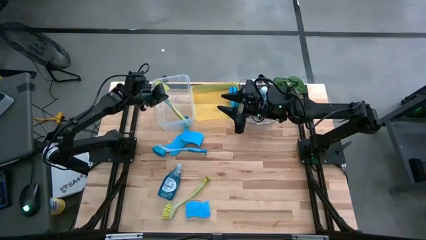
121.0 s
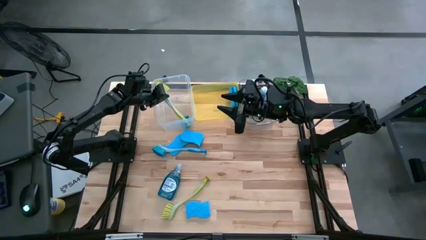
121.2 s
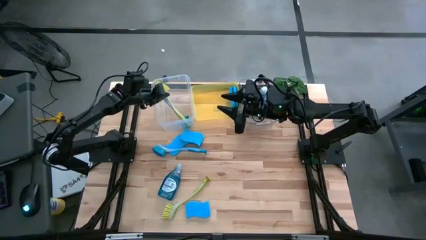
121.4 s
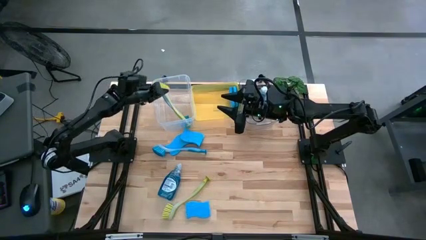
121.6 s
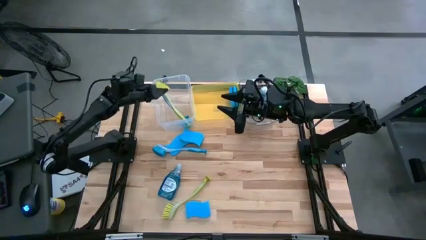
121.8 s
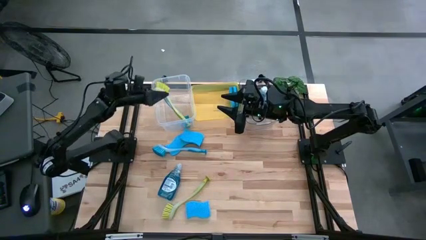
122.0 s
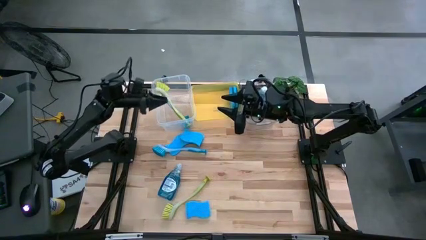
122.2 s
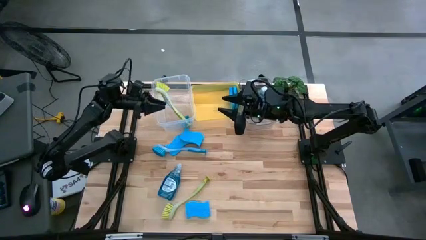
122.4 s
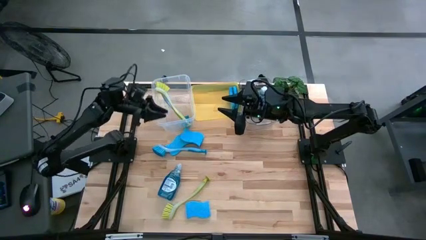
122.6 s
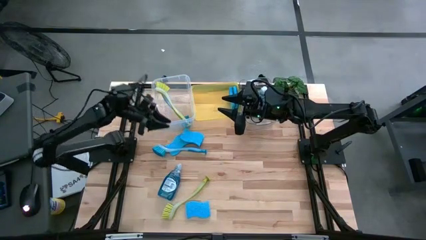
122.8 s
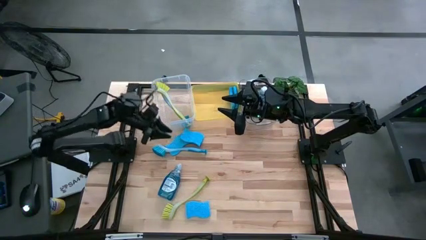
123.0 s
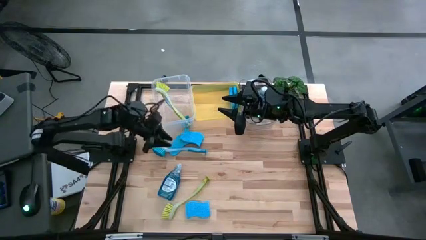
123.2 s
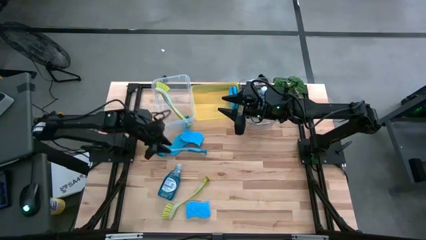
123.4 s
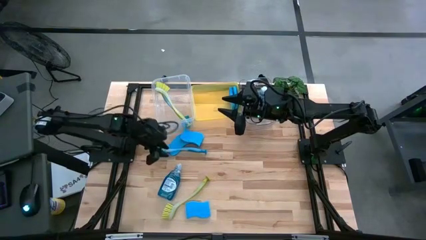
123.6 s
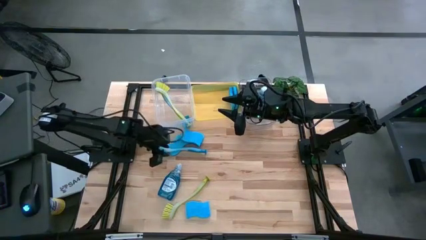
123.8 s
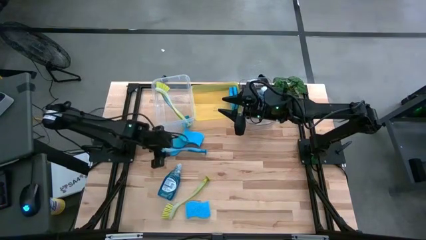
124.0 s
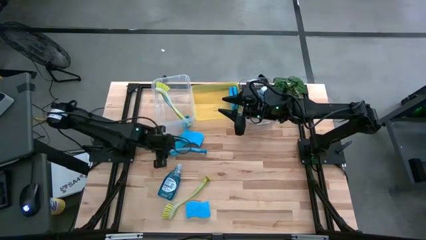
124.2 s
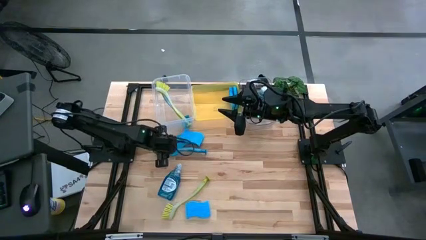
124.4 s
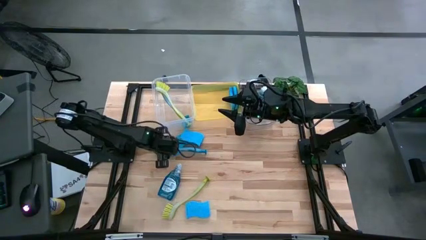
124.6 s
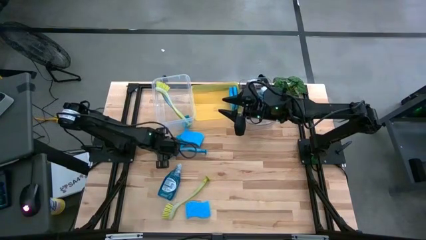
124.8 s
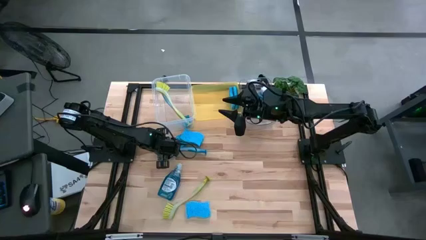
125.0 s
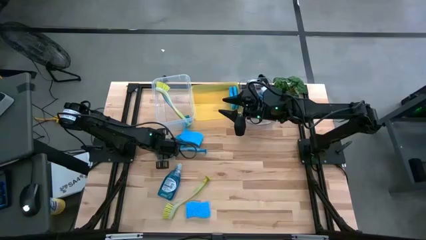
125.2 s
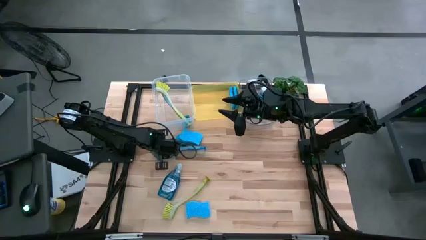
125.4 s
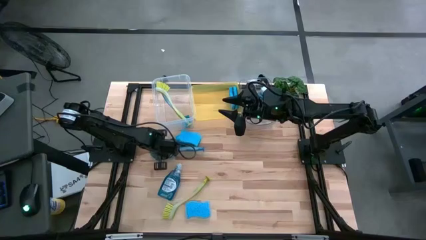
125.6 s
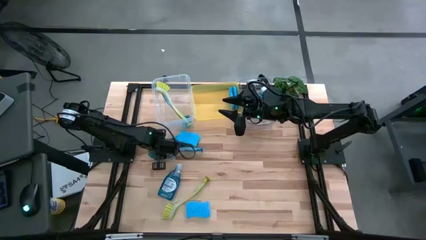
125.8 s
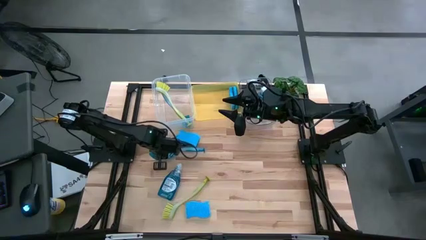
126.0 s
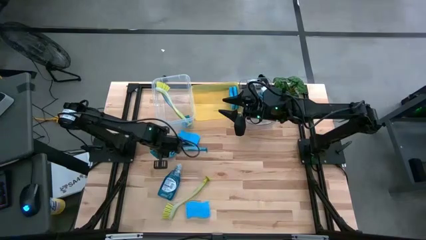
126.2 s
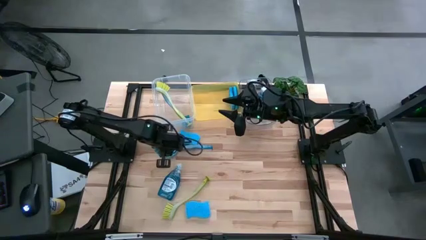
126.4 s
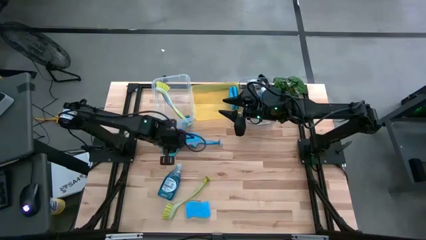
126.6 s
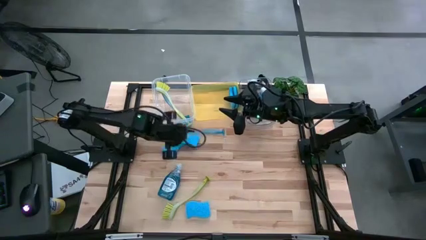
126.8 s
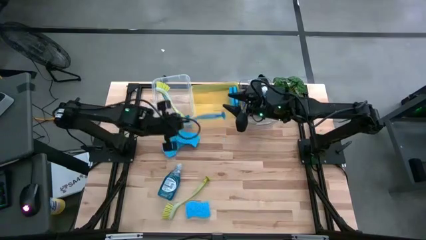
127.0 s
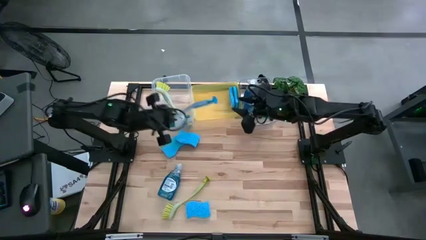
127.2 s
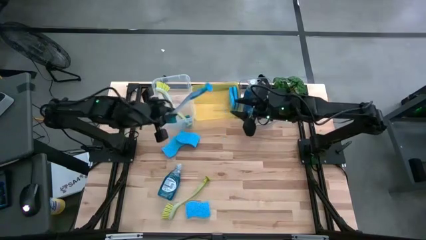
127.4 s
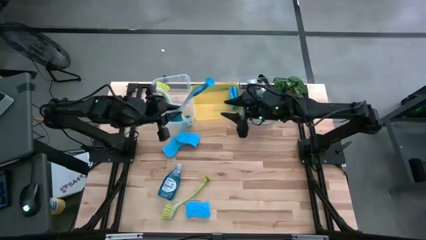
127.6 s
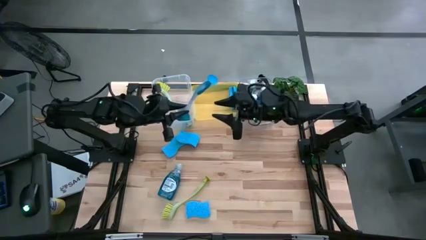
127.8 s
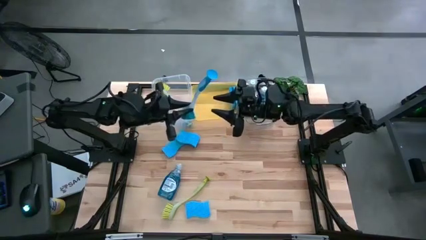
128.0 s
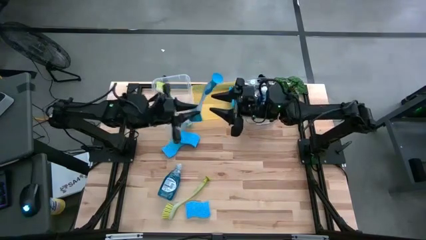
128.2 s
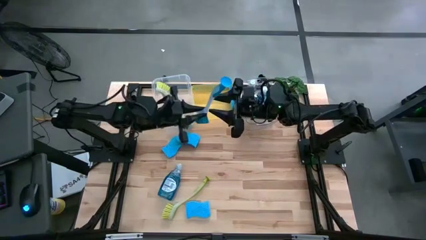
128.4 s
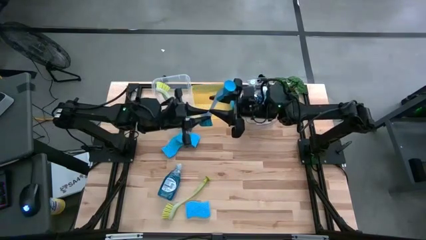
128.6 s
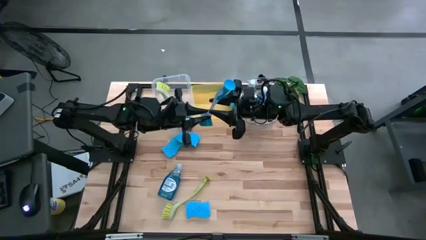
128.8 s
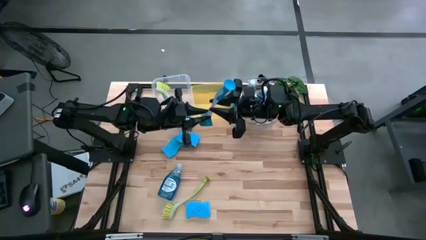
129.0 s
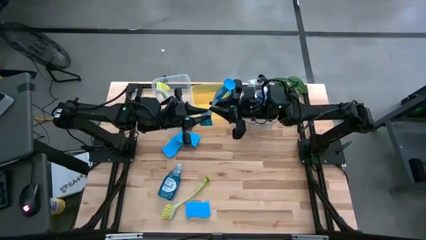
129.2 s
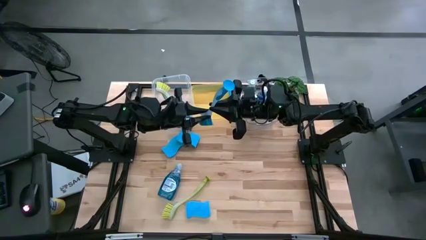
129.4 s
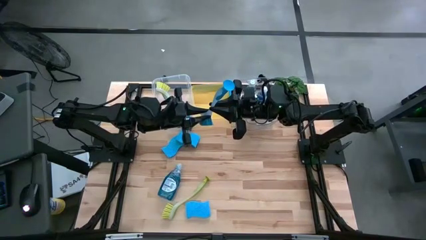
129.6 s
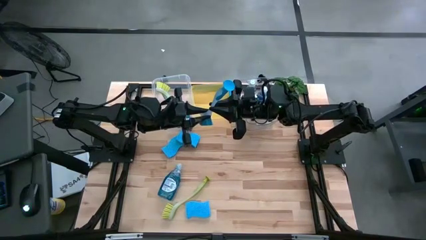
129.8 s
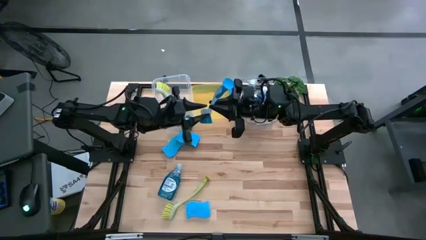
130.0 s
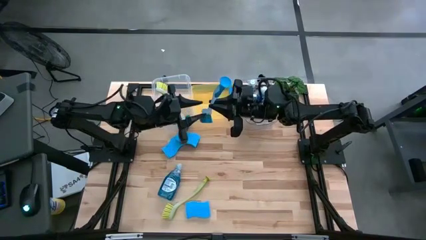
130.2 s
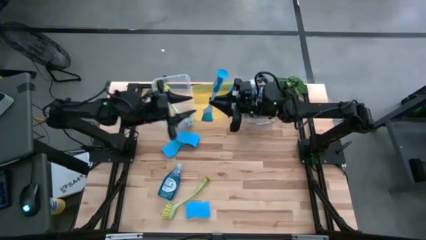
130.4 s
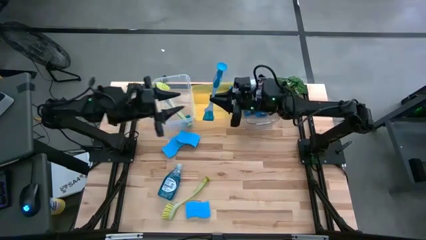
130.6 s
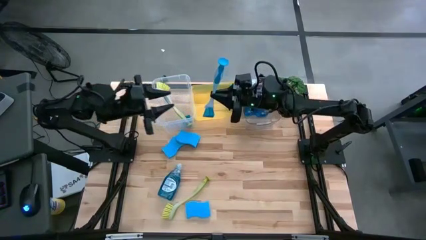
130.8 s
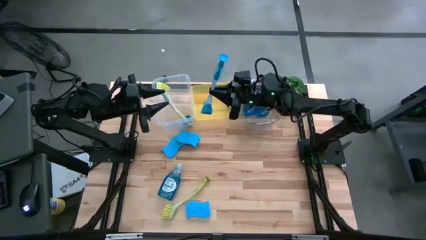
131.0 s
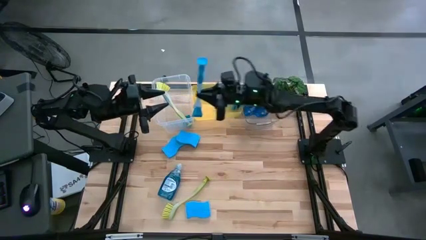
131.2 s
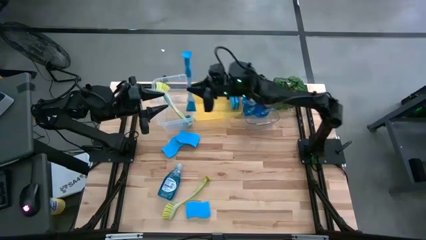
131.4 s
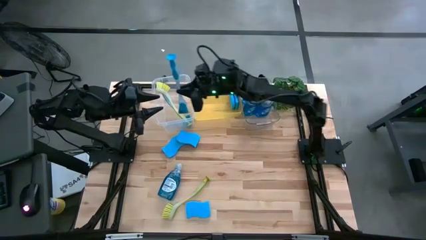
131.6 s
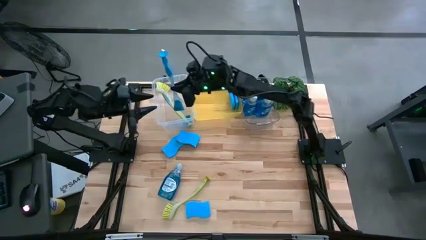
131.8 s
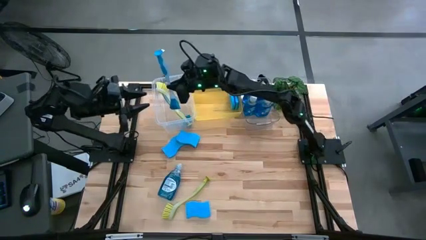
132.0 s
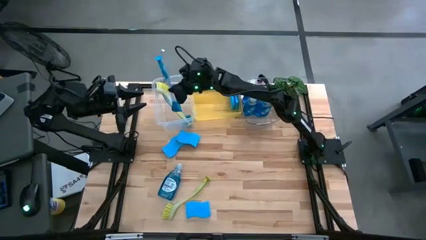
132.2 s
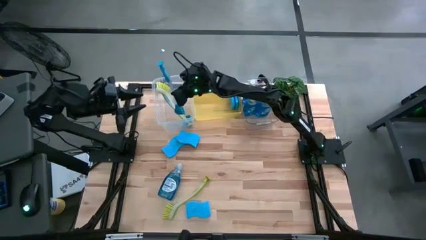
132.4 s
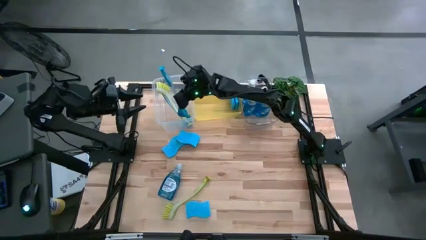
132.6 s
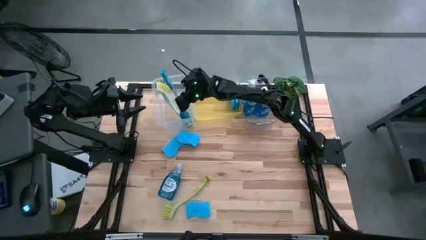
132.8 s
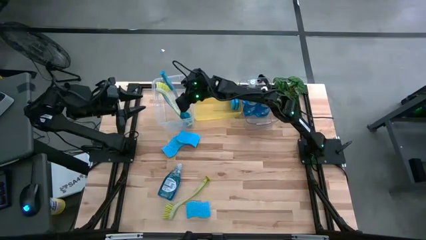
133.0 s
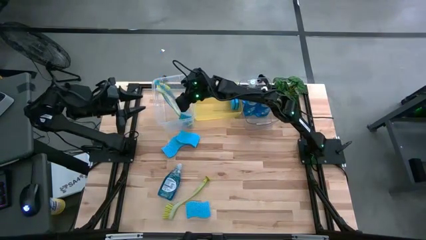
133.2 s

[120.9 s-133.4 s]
Task: Pick & Place Kitchen Sink Supplies
Put the blue dish brush into the white bin

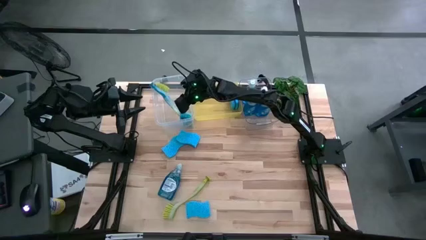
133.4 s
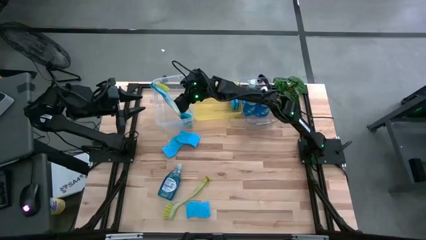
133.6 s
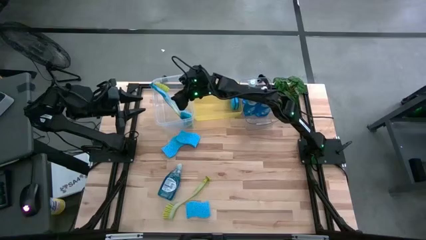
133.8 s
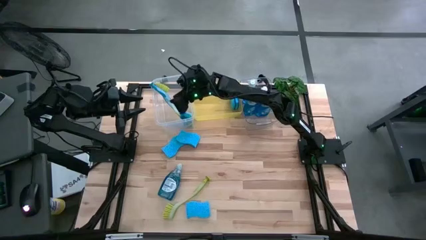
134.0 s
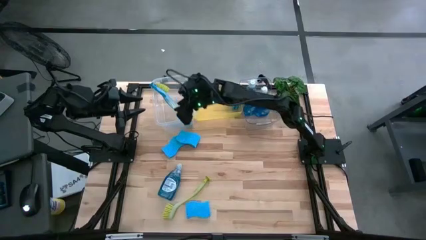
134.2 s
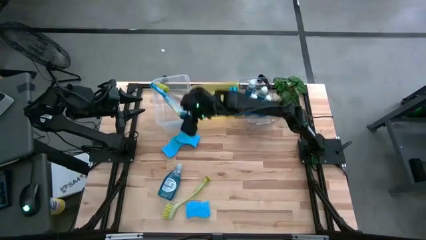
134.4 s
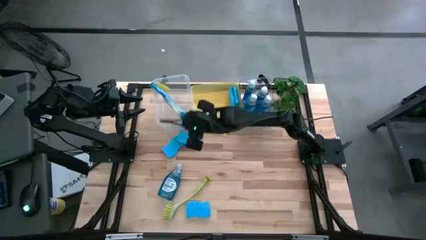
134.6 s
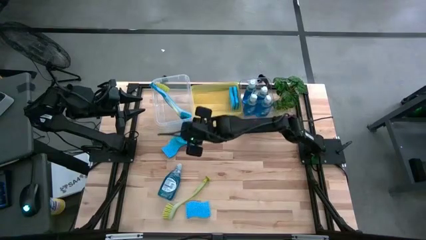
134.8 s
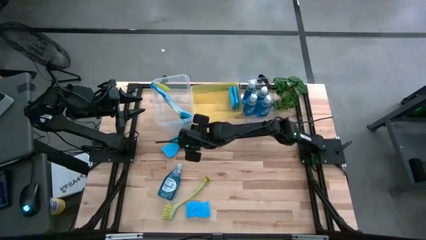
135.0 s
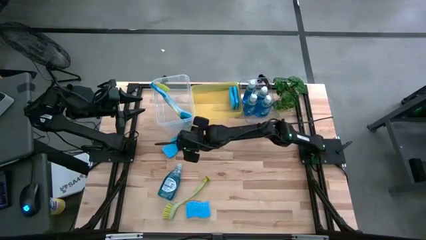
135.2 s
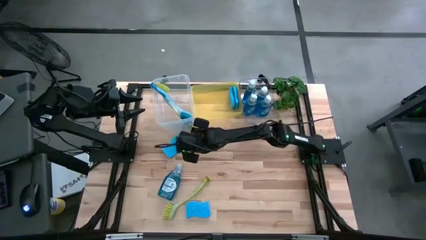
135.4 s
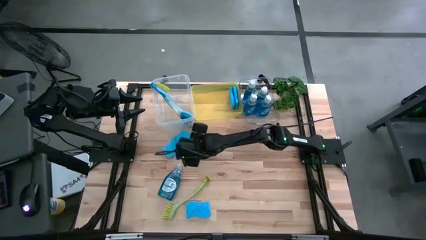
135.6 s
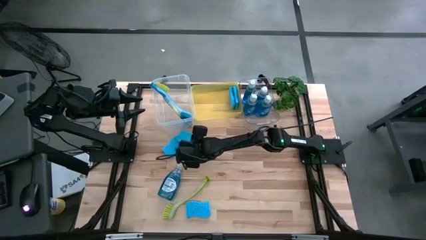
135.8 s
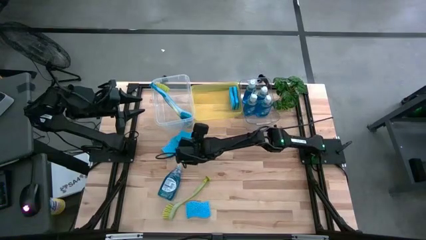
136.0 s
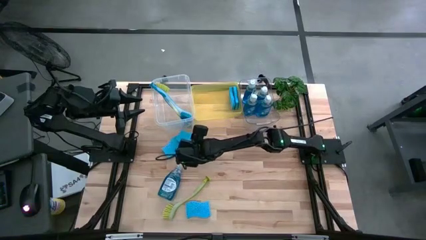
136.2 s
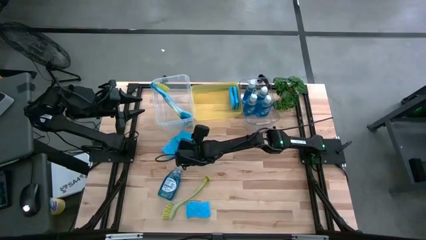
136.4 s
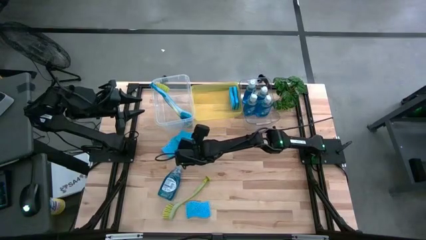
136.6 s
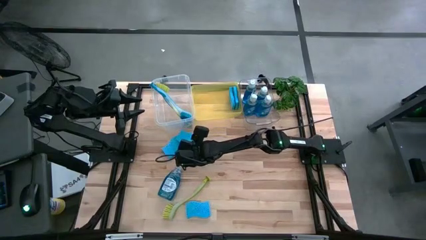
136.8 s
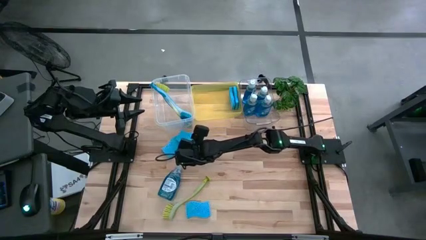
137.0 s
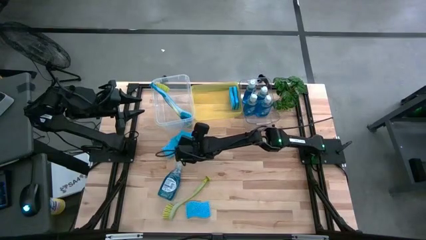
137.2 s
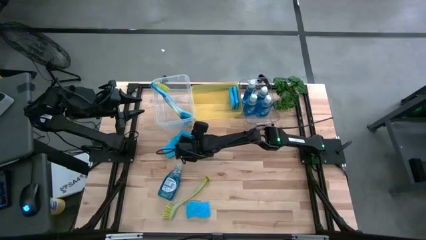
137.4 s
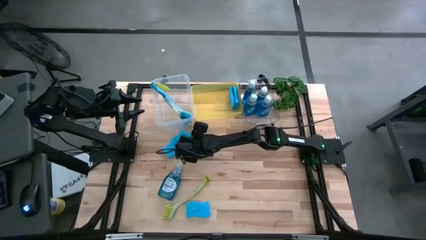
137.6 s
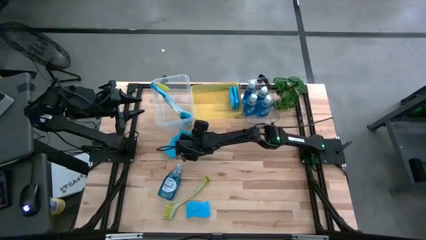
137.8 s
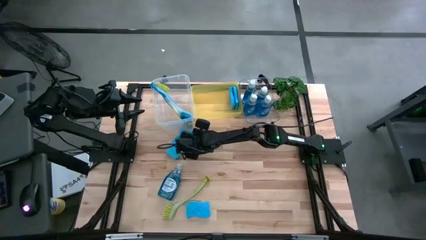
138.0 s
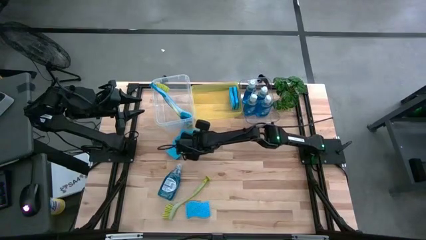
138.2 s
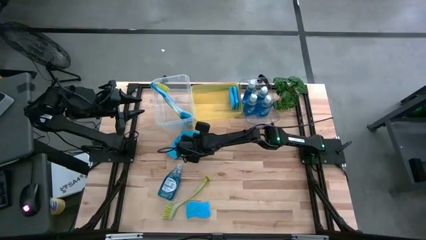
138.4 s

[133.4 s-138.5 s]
Put the blue sponge into the yellow bin
